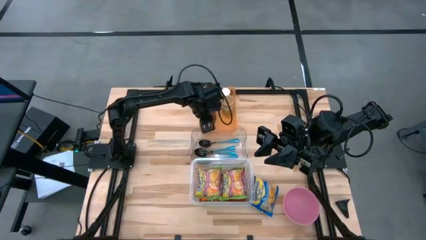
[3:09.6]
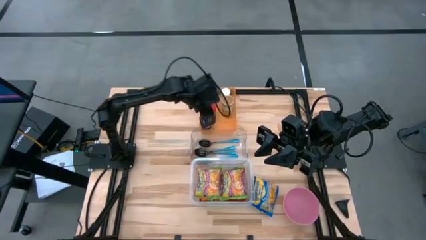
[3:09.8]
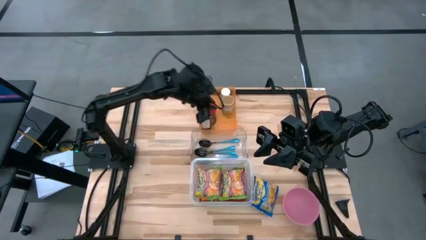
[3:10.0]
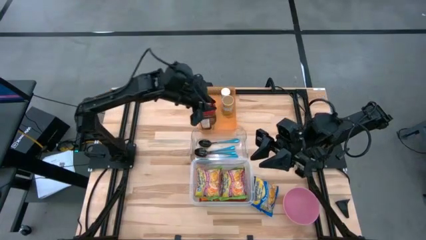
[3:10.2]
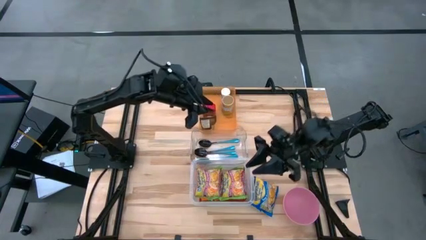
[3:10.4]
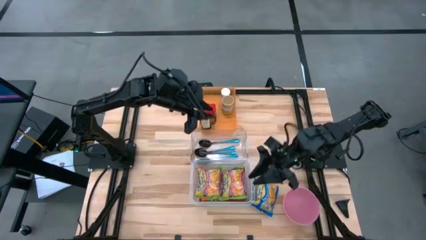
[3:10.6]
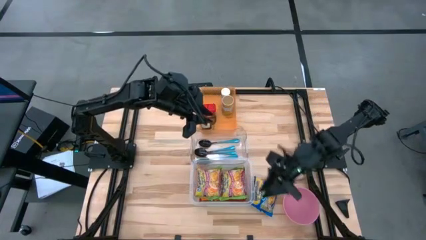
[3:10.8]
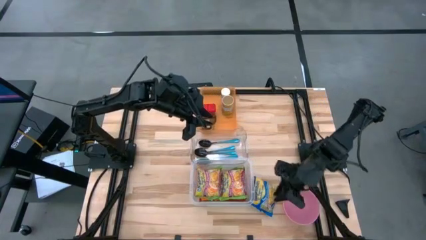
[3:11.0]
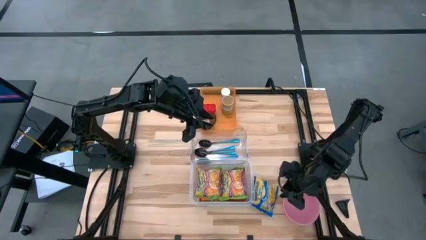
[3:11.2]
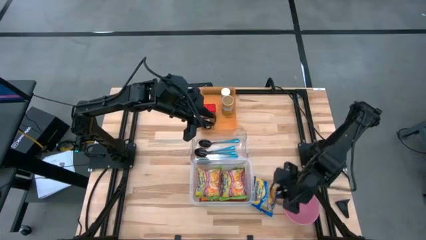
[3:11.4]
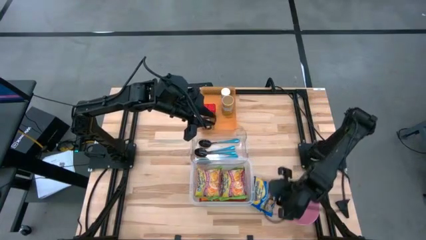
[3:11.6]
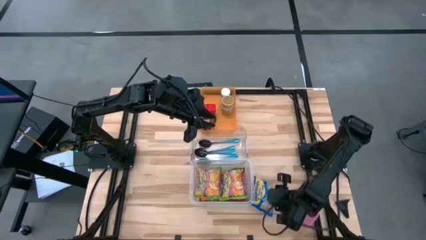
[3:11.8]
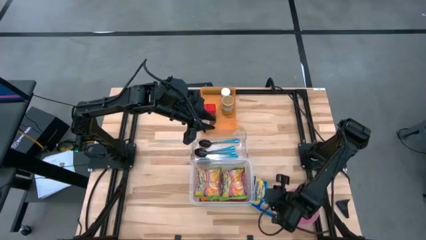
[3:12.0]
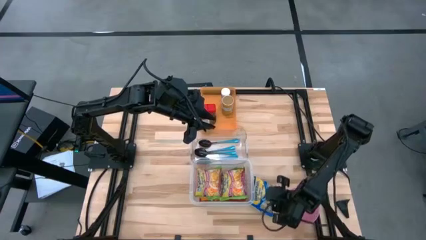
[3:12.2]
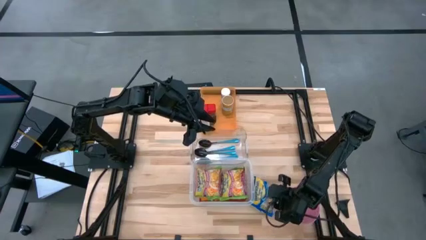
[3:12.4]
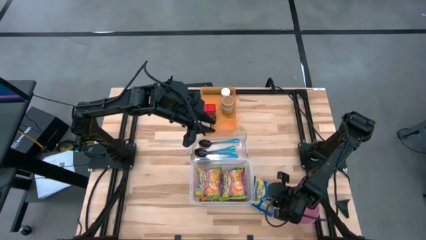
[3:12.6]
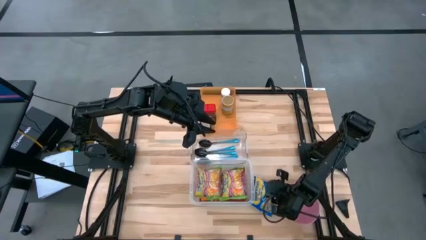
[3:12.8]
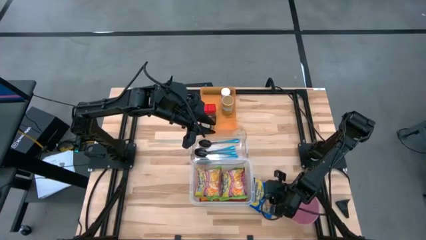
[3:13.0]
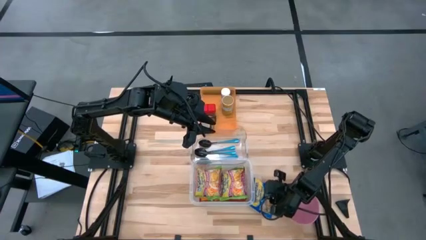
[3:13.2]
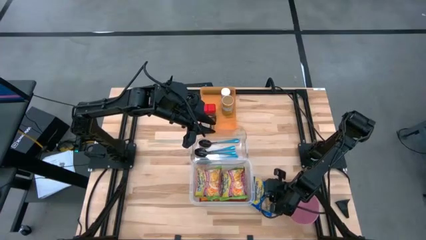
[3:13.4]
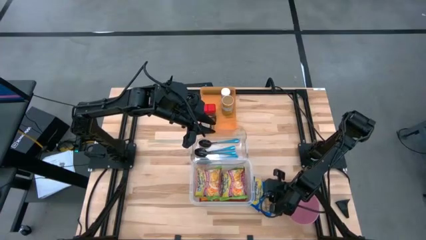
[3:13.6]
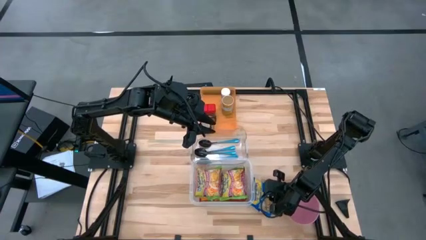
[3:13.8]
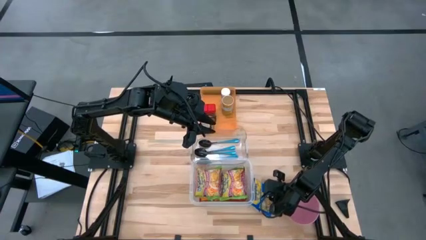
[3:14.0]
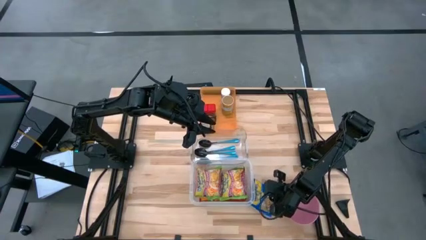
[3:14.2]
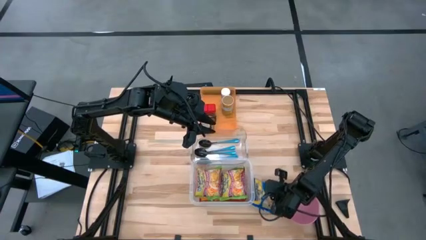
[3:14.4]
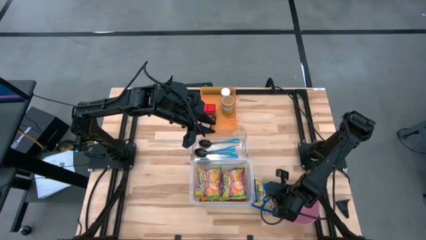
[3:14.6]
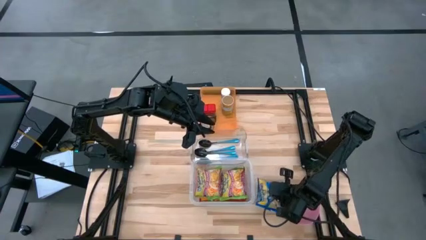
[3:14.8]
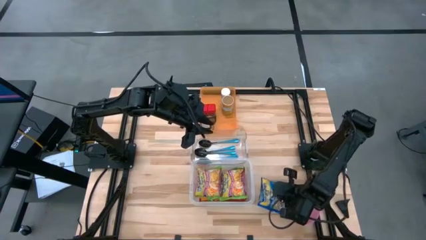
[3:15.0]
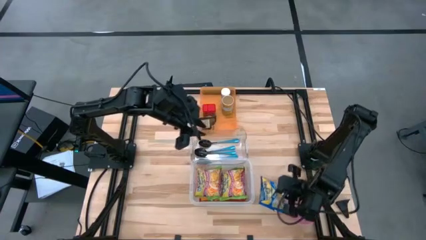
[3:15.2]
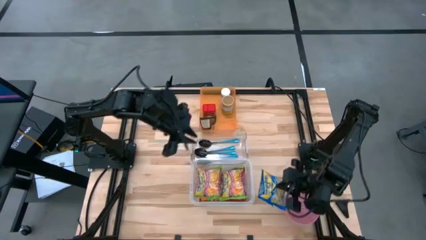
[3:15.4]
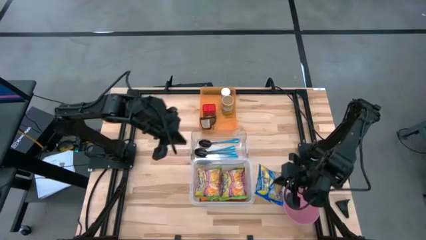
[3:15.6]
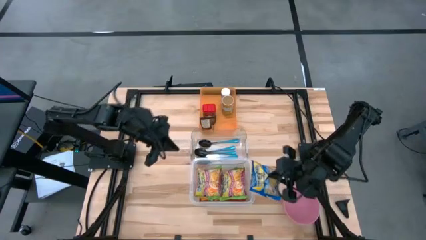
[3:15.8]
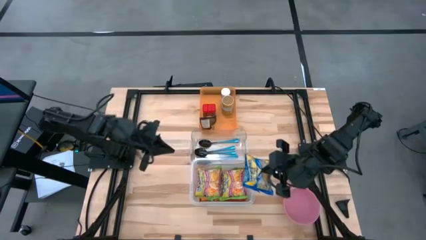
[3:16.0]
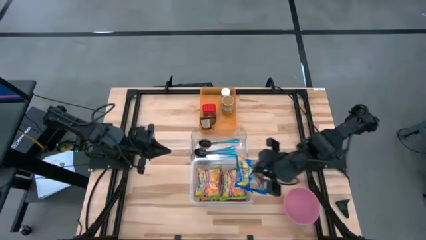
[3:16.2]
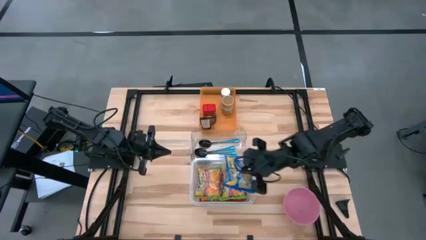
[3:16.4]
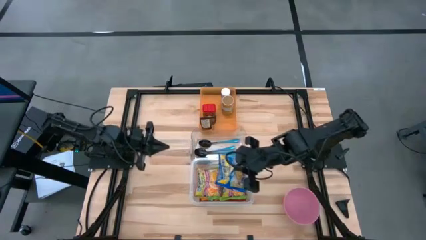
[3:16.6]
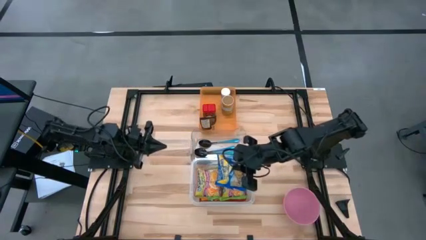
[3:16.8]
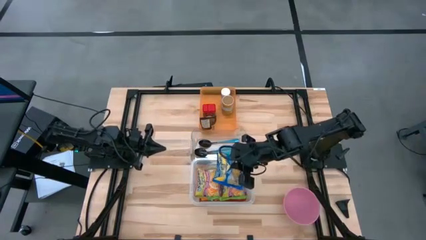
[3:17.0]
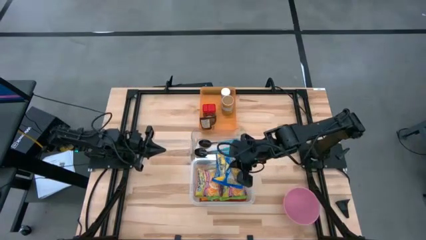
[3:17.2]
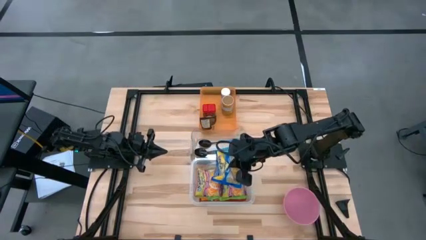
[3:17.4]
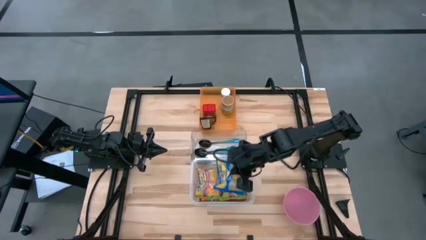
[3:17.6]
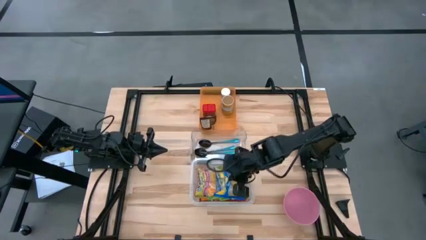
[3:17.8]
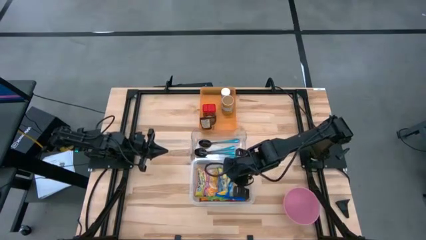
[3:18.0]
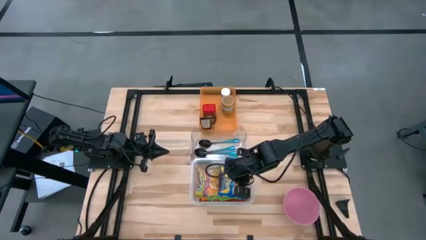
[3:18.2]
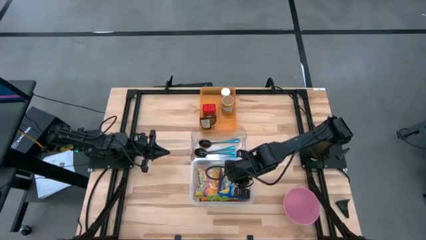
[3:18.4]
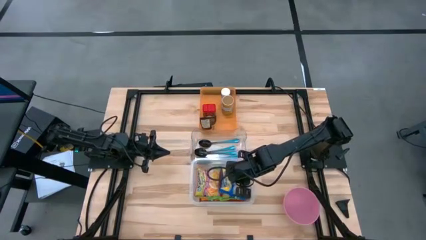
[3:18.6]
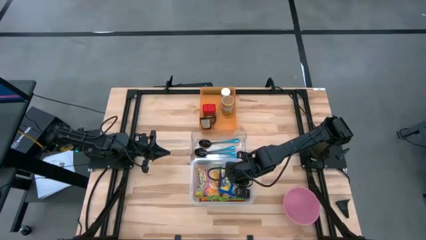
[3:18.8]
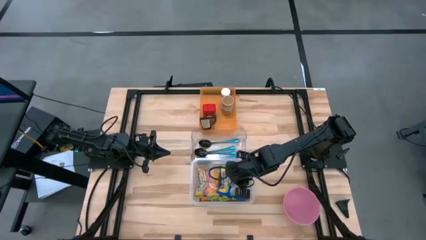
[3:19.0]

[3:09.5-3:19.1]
Task: Pick & Place Food Item
Put the blue noodle pack into the white transparent bin

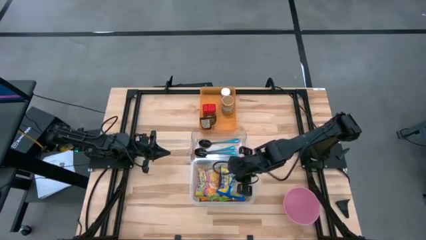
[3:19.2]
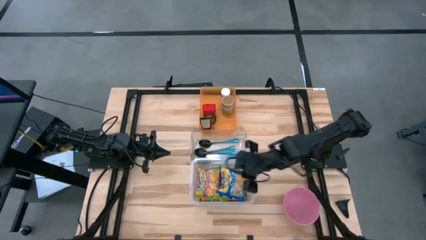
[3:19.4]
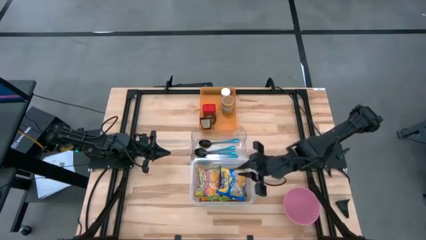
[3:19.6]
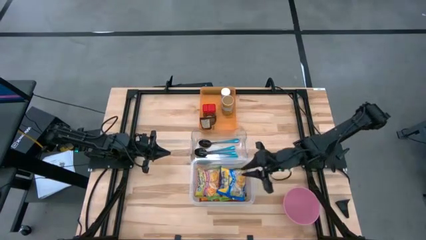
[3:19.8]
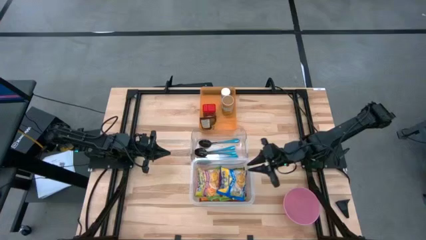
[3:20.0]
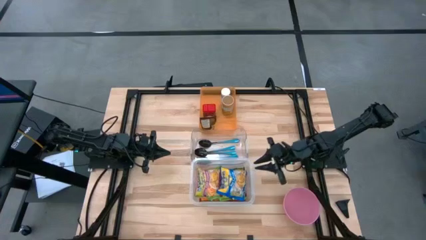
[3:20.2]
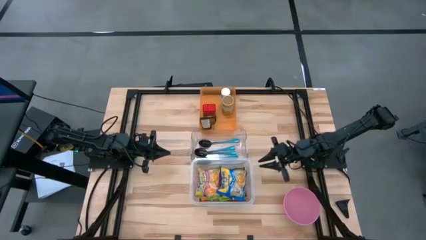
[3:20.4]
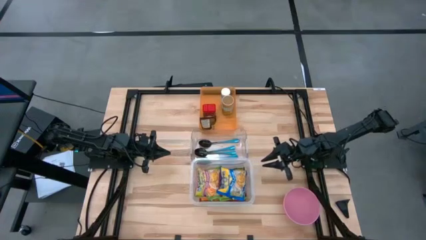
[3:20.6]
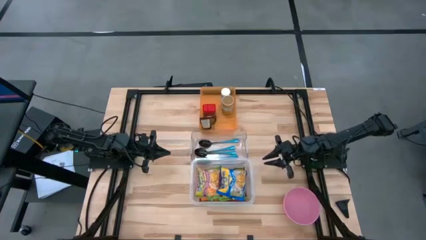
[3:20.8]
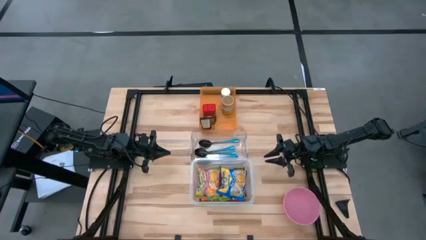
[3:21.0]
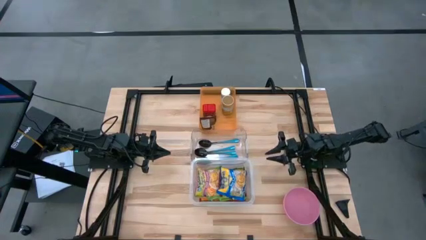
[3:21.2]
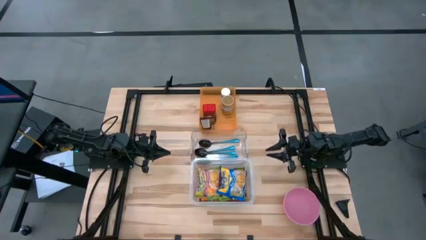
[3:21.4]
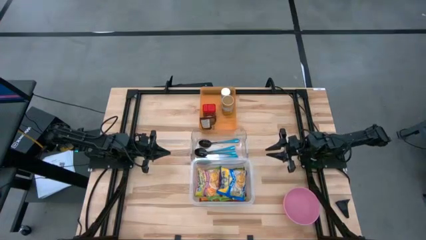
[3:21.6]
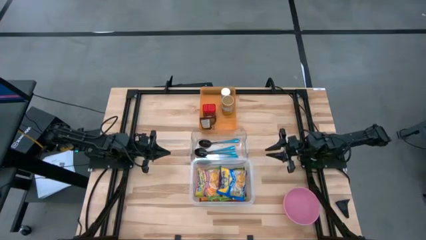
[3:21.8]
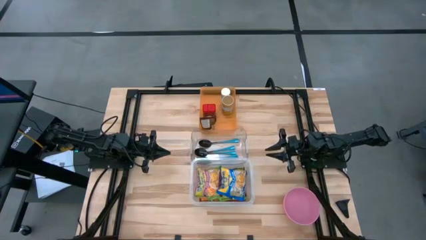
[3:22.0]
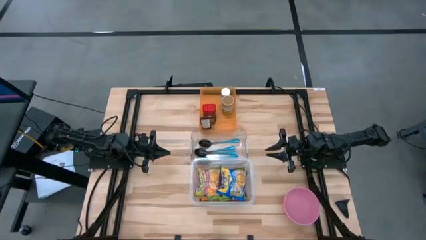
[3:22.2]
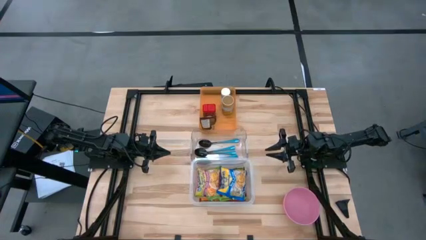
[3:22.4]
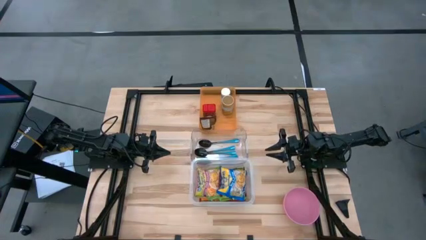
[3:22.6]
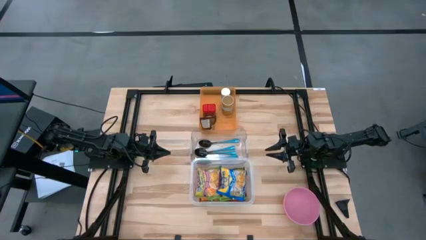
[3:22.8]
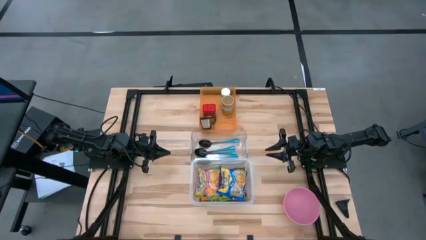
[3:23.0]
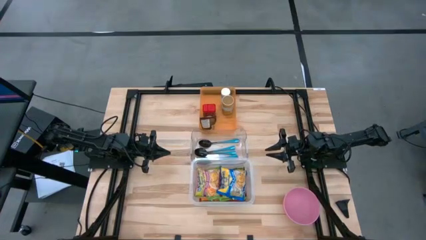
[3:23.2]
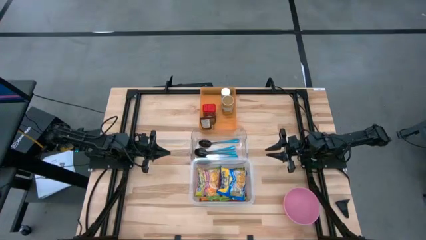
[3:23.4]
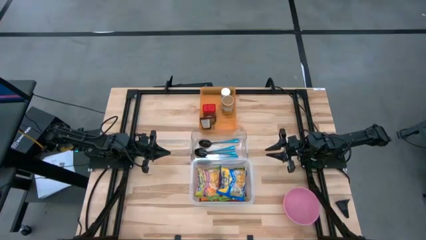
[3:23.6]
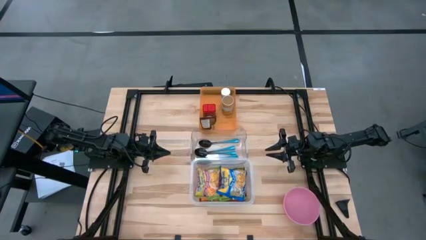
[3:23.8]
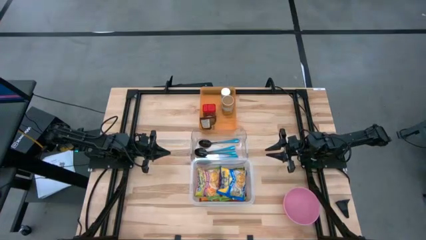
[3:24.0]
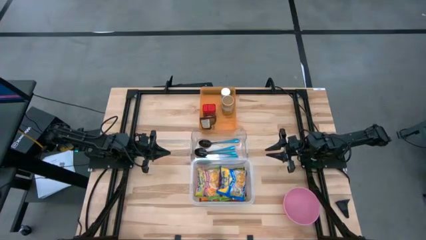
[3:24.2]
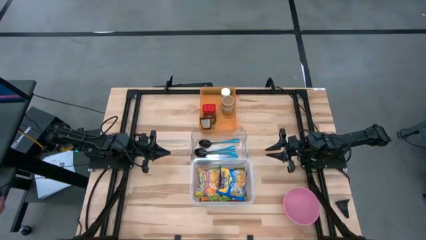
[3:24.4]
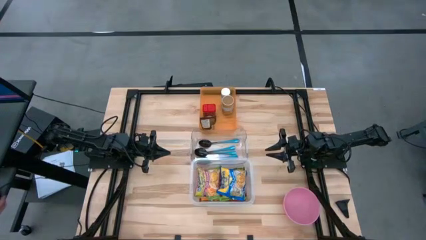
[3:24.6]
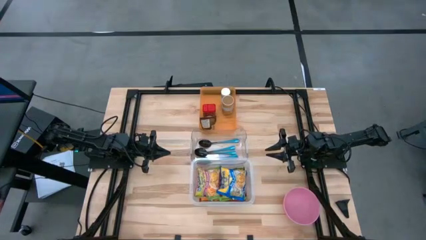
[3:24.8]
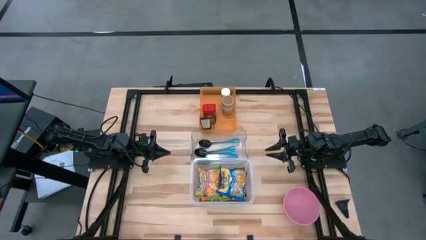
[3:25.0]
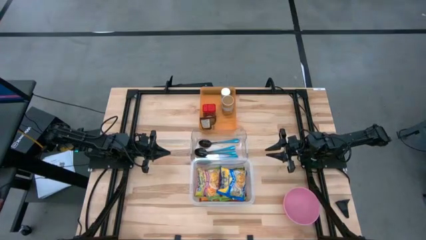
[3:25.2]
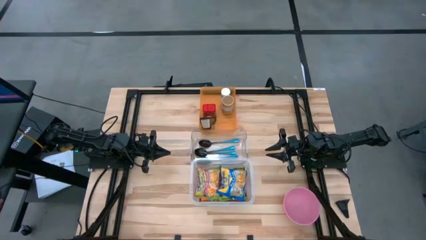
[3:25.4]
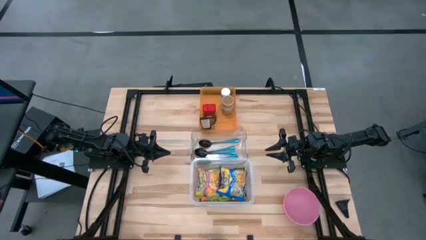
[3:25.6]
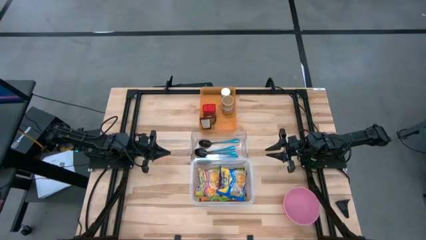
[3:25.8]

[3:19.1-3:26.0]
Return to Home Position
